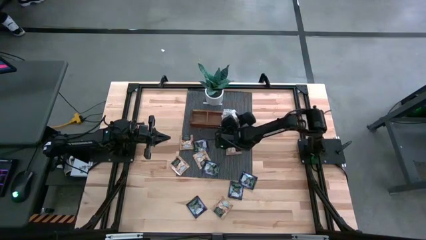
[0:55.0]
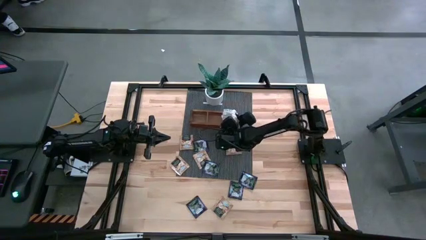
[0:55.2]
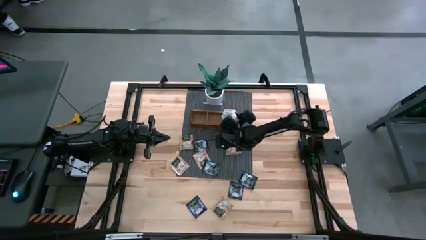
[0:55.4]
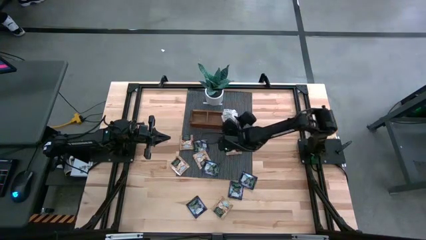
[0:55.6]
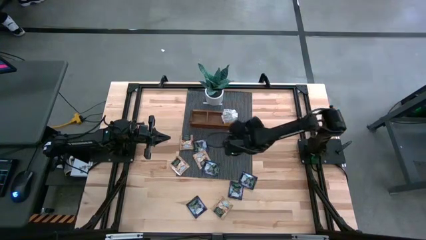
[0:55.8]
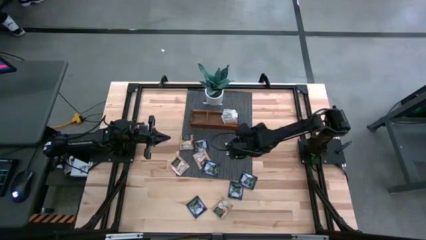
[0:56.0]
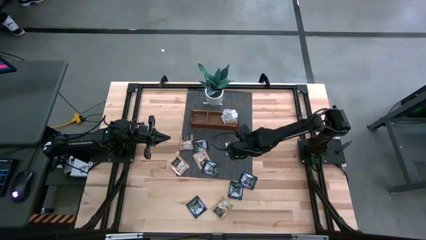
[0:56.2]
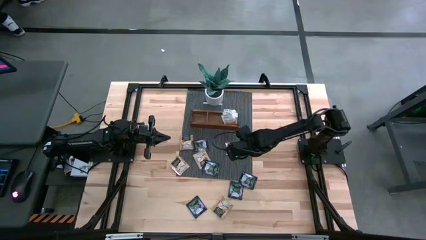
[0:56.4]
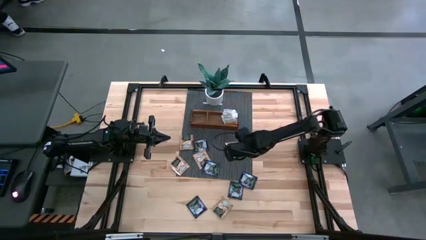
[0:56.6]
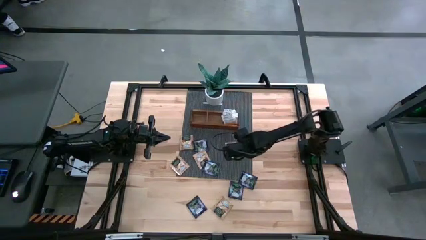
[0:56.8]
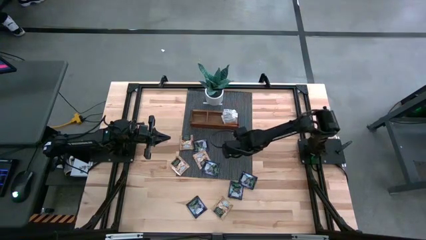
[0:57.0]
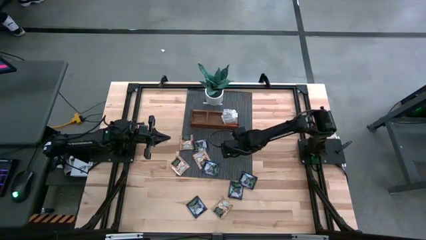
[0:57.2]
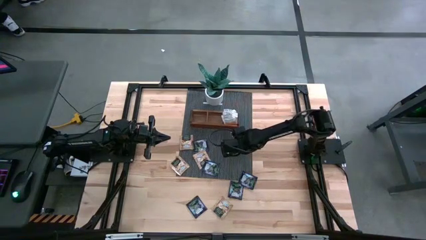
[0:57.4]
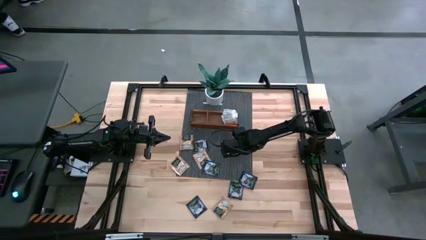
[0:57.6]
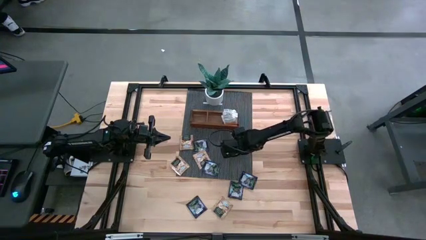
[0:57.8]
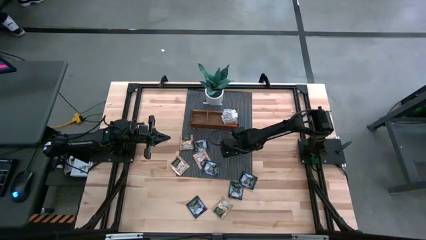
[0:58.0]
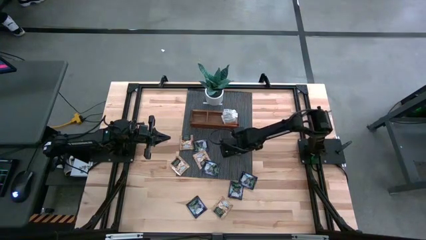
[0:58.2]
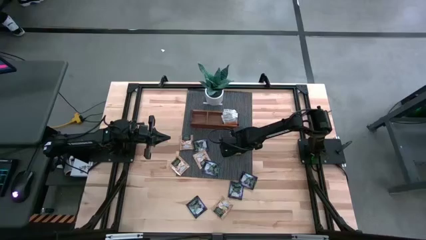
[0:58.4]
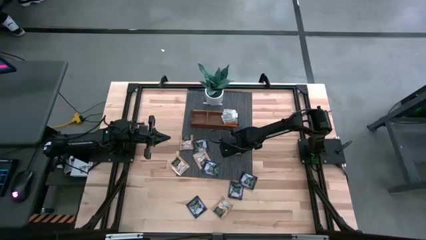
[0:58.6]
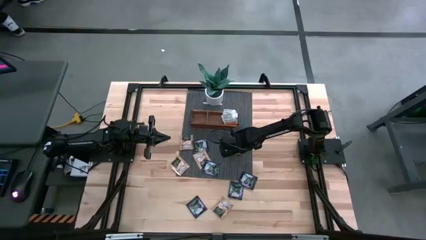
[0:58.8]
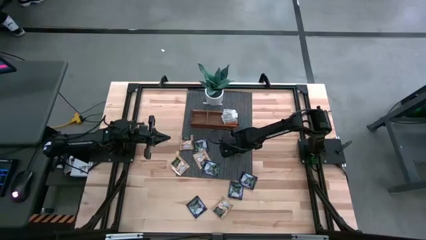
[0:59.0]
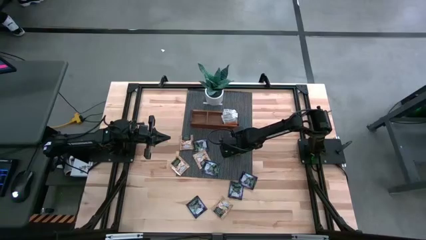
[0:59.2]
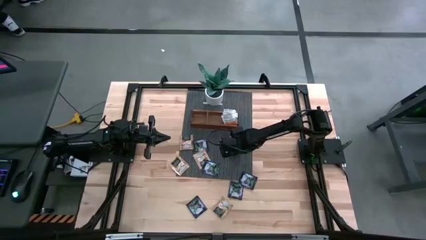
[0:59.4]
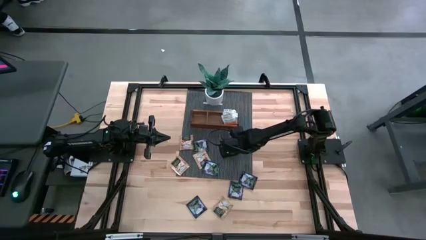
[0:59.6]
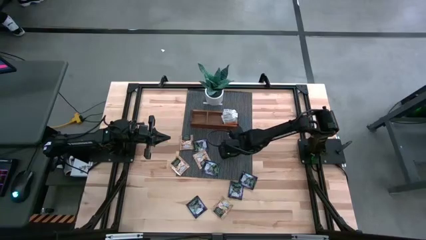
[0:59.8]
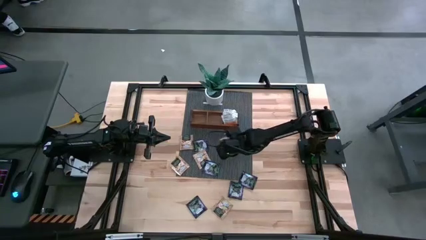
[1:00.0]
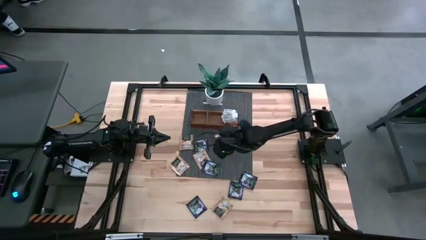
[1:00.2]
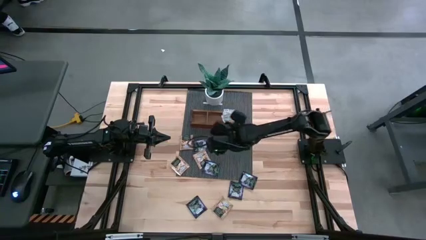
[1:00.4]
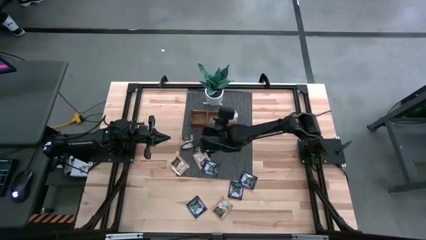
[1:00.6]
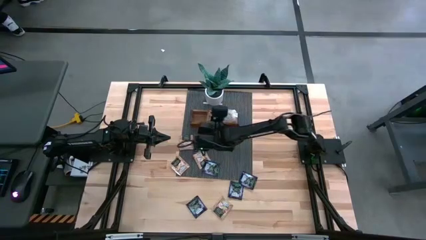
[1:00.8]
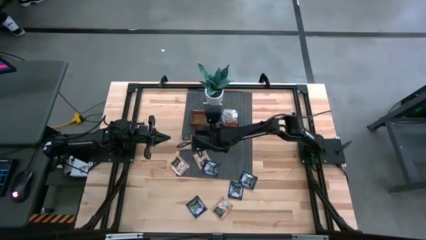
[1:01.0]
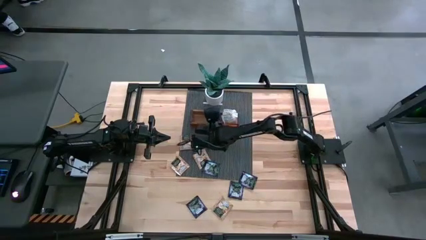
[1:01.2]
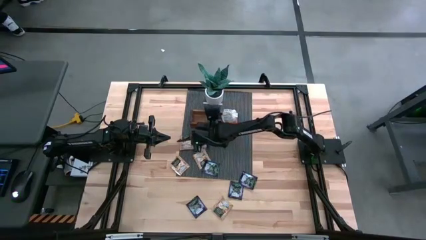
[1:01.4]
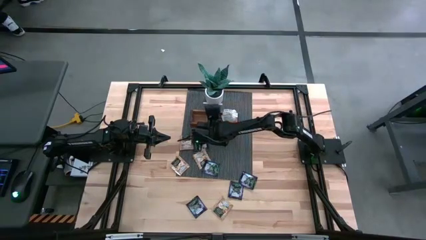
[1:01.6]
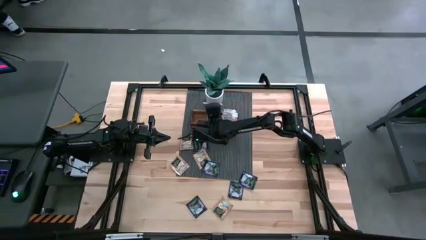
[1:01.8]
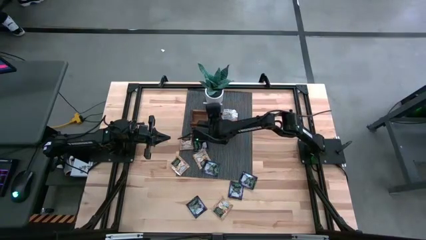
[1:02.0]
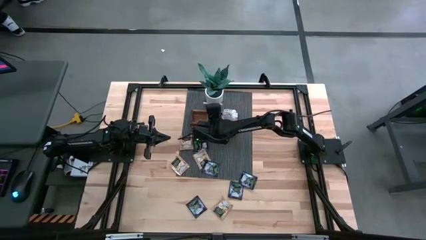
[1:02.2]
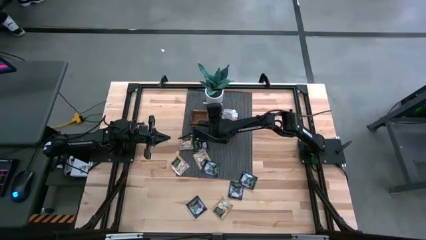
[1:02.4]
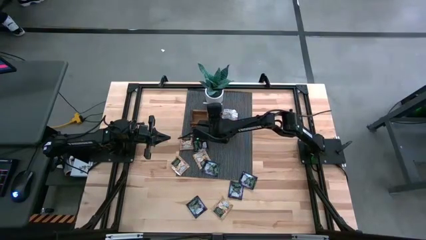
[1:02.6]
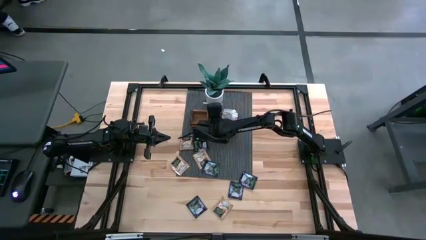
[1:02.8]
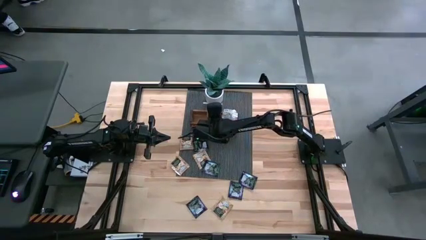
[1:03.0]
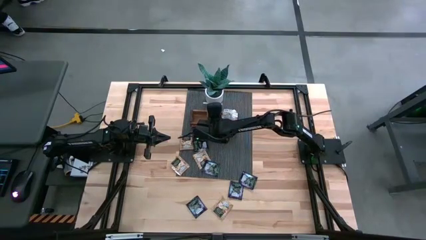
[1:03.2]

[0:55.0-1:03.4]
Task: Pick & Place Tea
Put the brown tea bag into the middle section of the wooden organizer

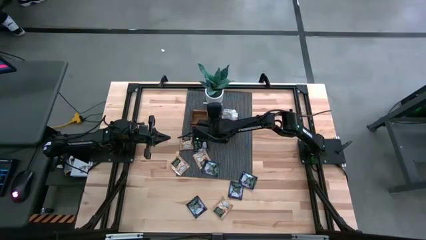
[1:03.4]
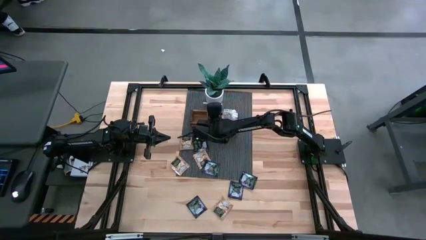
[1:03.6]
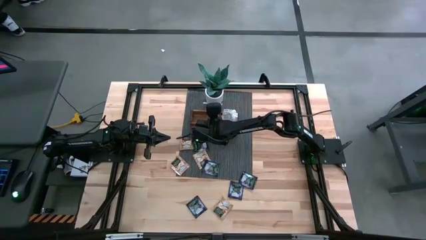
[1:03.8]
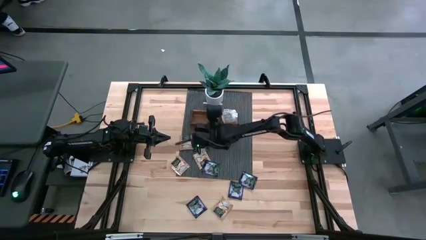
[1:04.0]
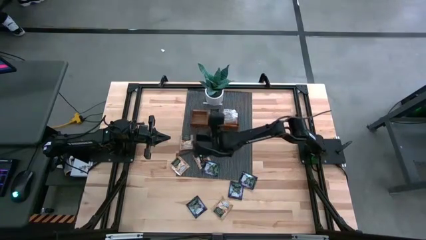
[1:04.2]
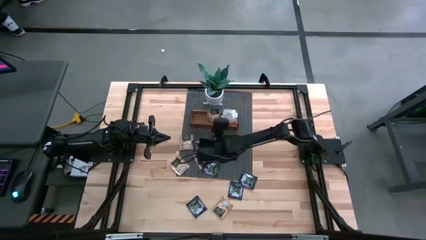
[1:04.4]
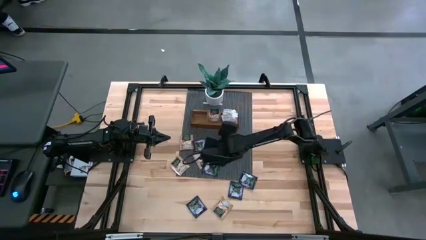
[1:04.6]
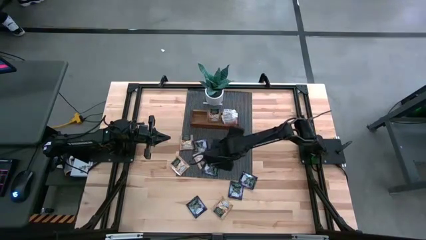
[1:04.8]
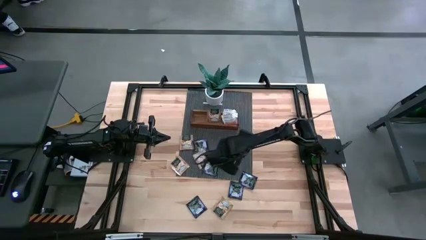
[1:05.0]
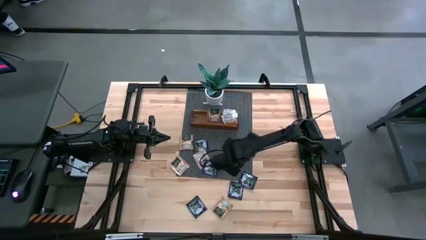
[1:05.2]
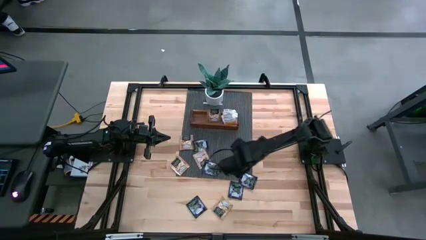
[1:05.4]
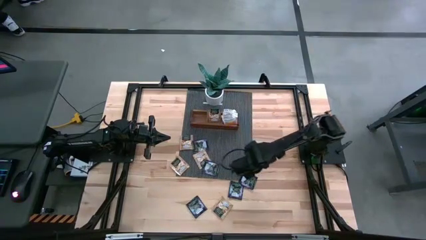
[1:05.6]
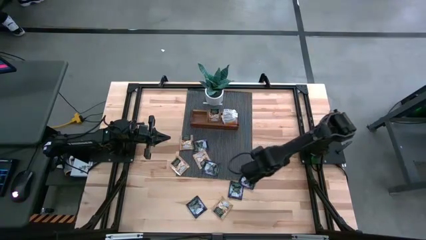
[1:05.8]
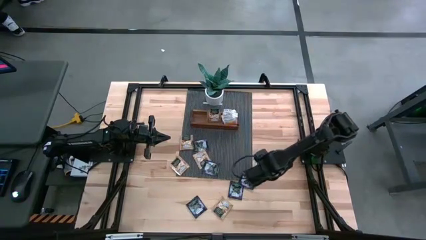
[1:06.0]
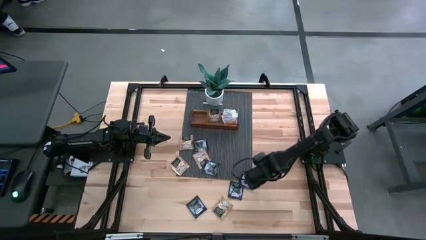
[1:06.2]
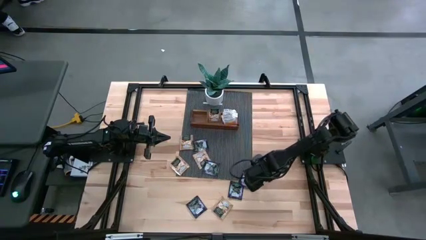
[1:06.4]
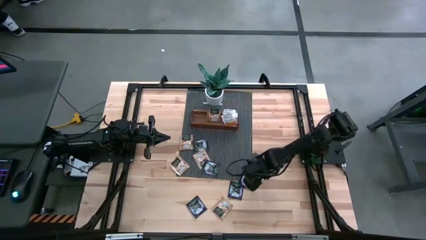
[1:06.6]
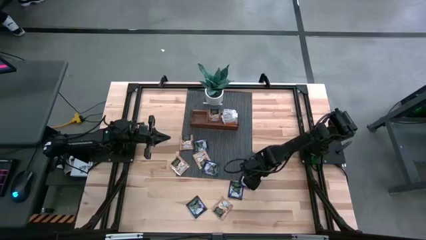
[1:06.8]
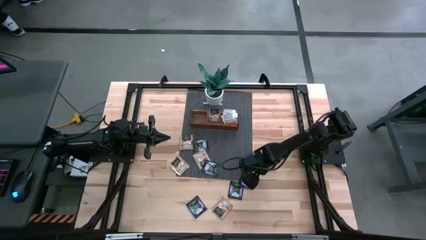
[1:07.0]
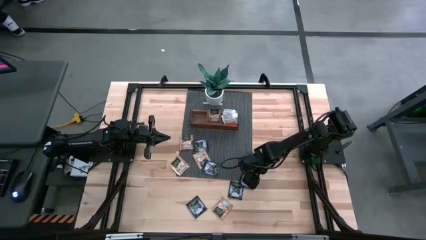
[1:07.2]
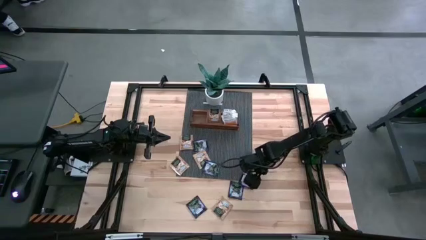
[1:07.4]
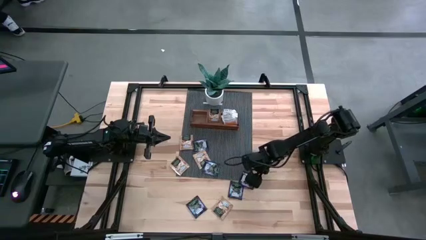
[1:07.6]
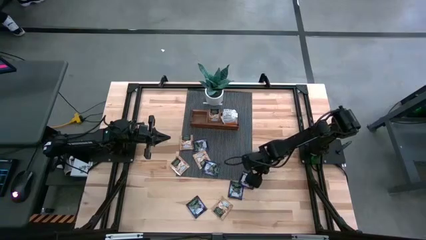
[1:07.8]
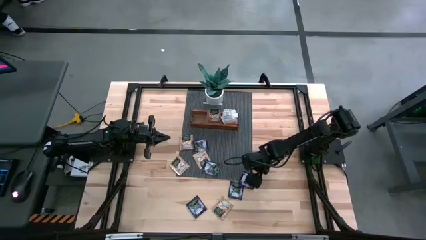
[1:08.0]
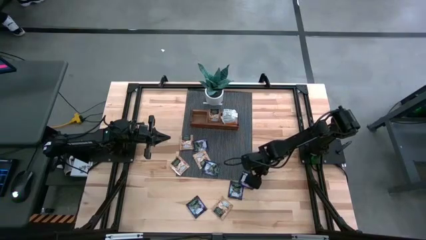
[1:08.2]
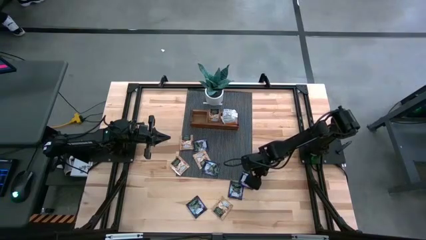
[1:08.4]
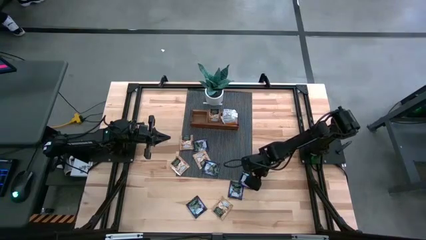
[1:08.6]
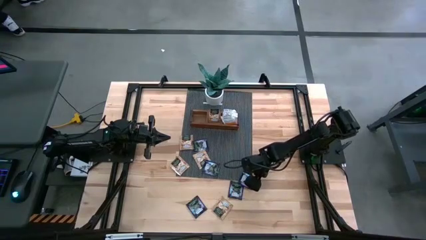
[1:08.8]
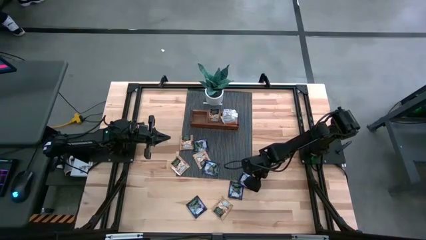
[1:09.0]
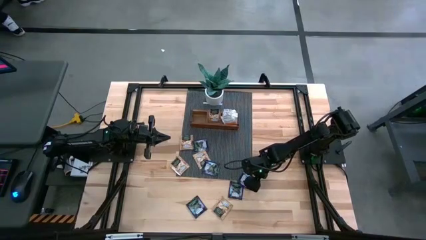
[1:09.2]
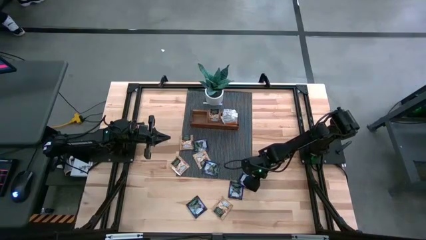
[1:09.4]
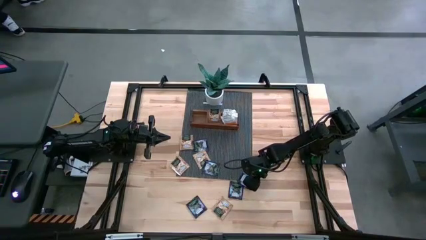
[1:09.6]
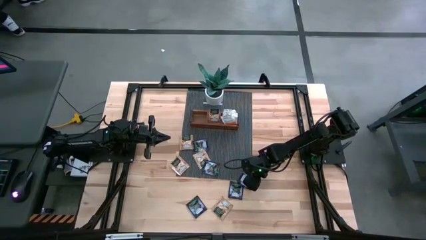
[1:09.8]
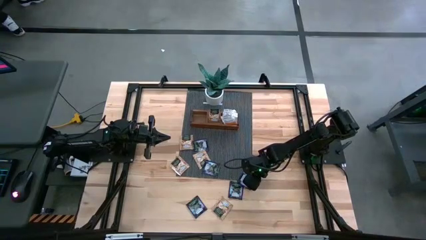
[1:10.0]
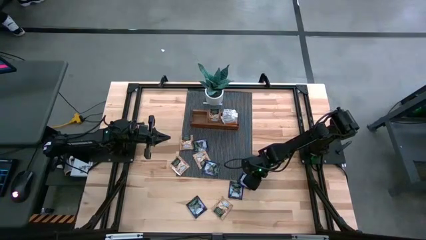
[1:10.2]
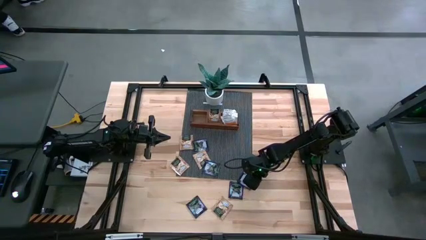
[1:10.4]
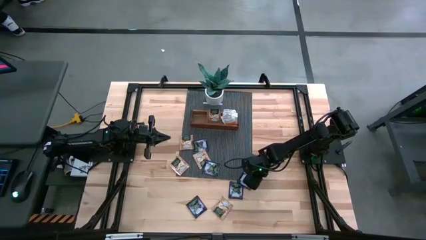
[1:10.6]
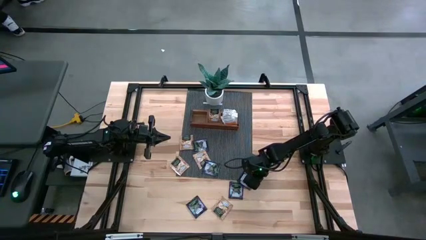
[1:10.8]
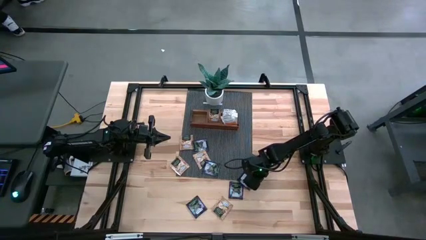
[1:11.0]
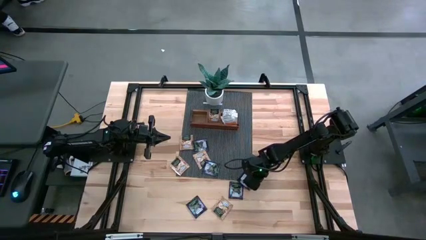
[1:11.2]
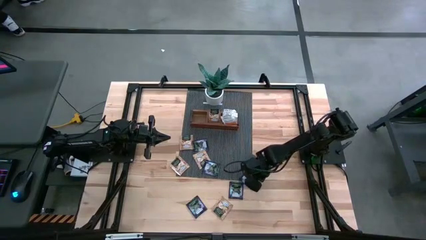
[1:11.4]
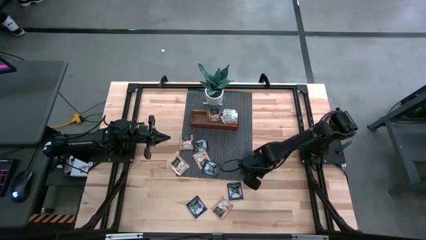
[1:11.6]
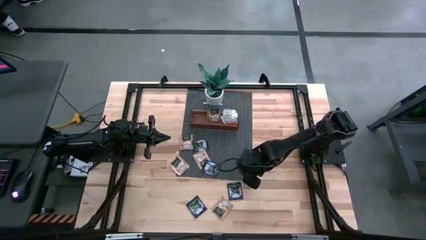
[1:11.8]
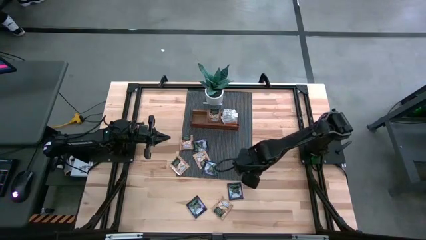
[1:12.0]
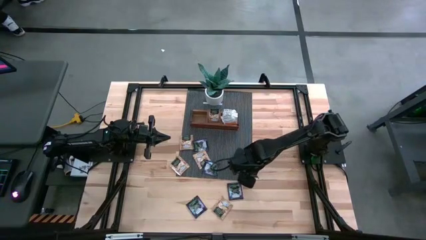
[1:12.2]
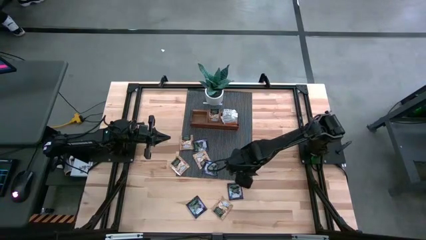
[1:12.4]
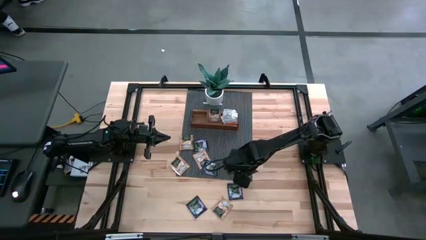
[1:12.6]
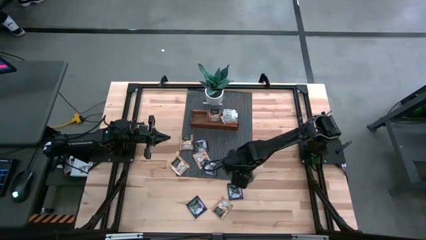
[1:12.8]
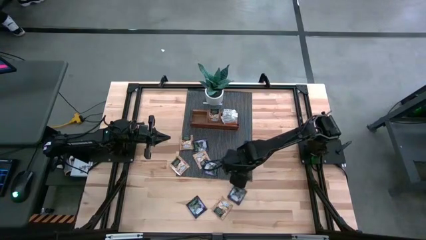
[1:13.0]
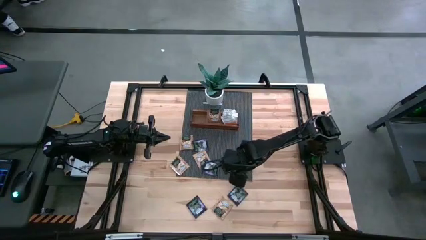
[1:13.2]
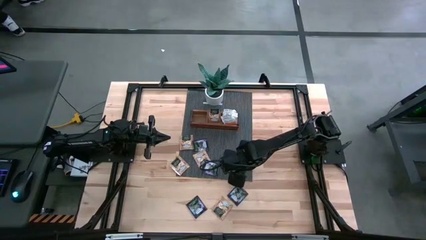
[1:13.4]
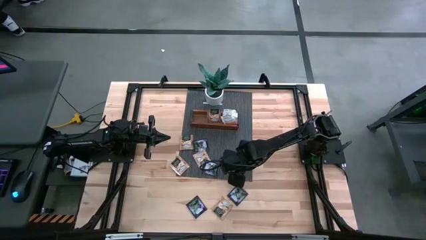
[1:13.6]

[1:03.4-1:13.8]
Put the purple tea bag into the left section of the wooden organizer
